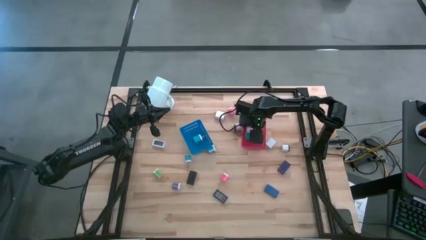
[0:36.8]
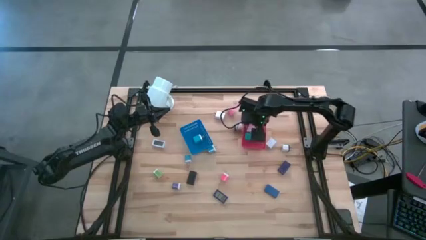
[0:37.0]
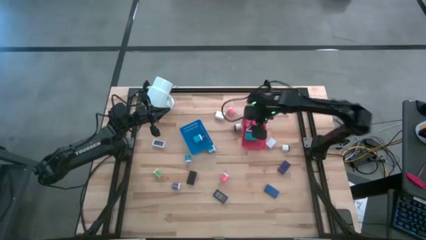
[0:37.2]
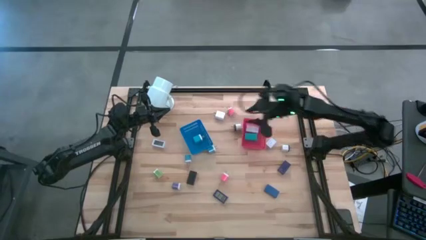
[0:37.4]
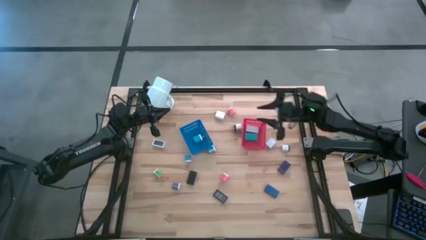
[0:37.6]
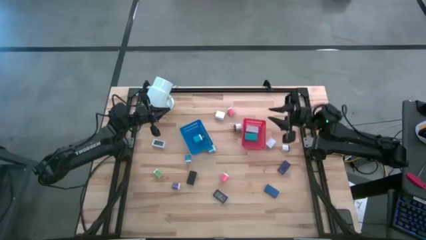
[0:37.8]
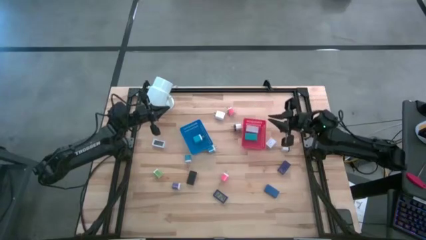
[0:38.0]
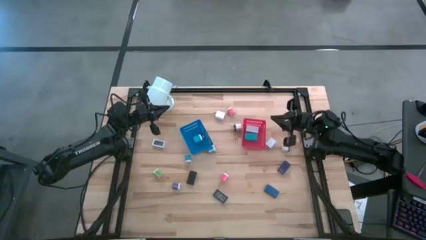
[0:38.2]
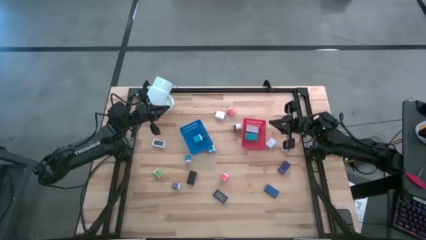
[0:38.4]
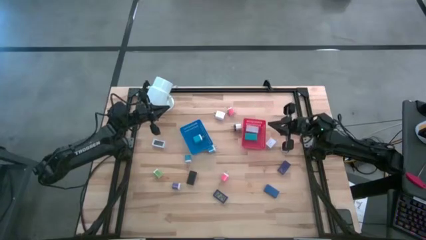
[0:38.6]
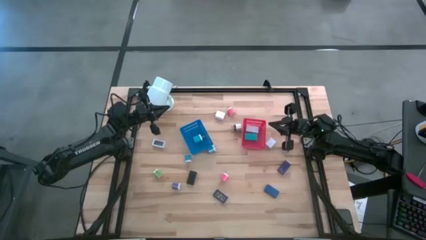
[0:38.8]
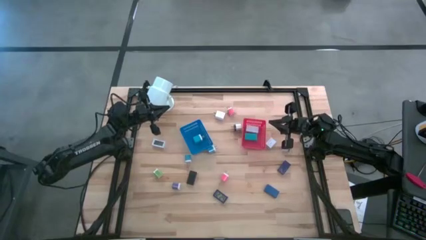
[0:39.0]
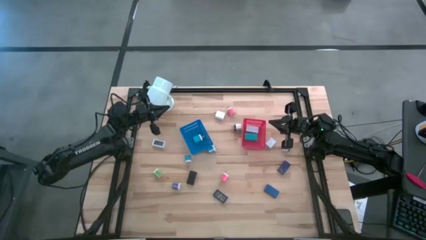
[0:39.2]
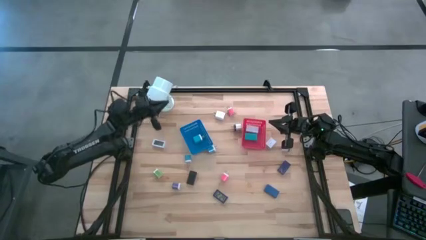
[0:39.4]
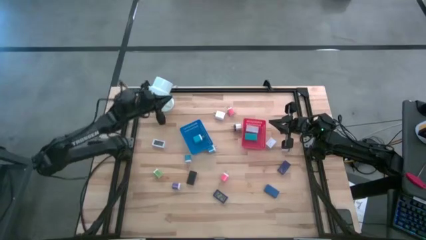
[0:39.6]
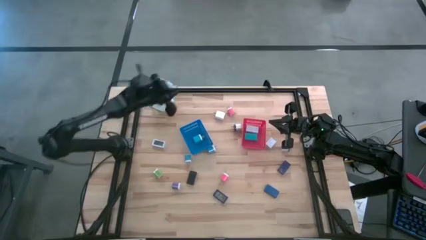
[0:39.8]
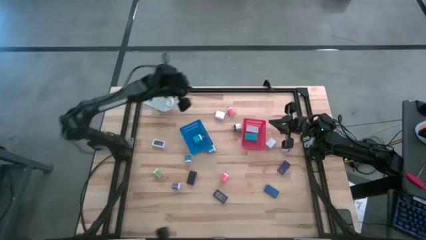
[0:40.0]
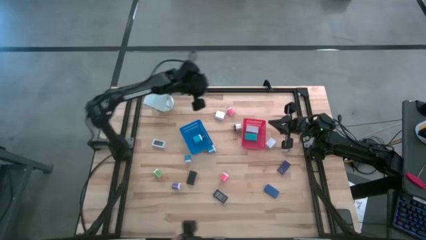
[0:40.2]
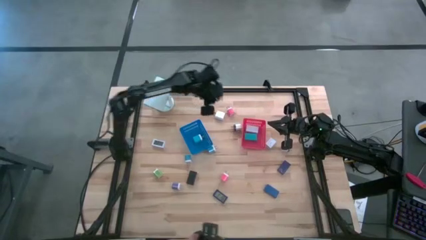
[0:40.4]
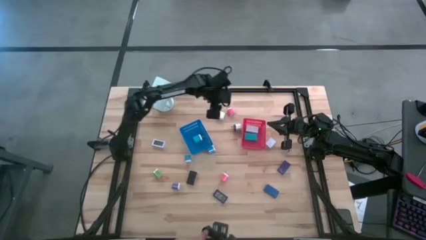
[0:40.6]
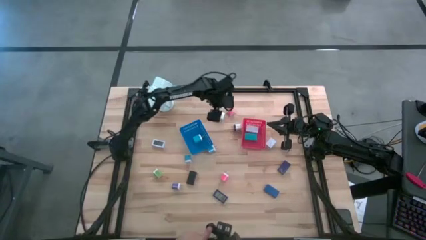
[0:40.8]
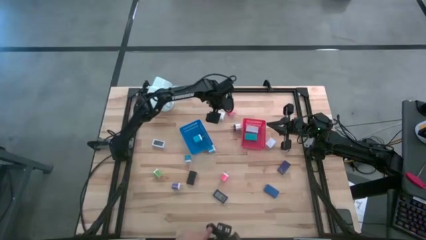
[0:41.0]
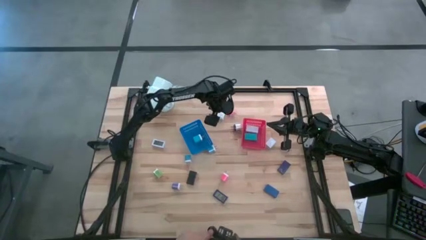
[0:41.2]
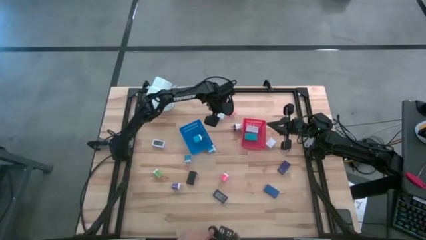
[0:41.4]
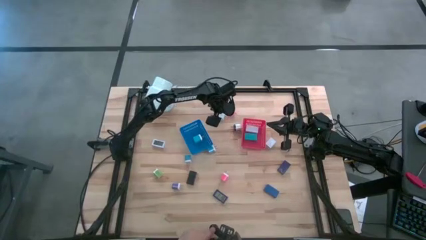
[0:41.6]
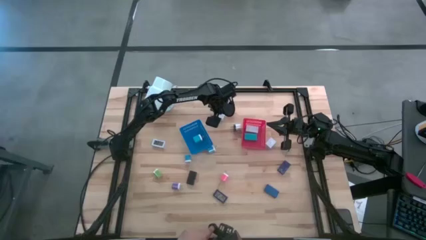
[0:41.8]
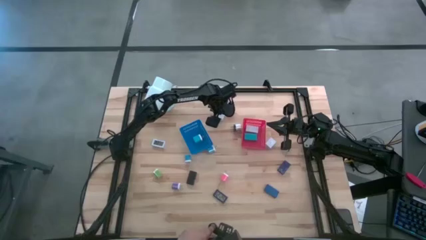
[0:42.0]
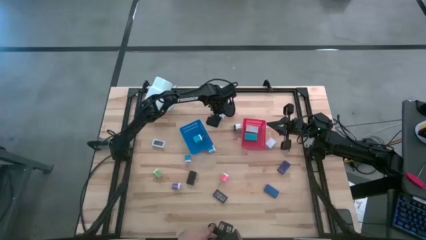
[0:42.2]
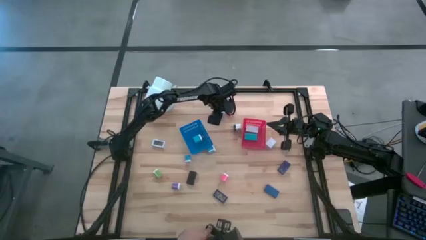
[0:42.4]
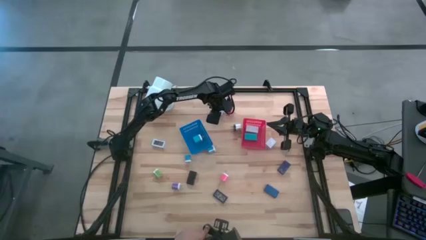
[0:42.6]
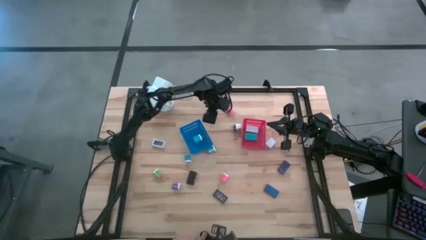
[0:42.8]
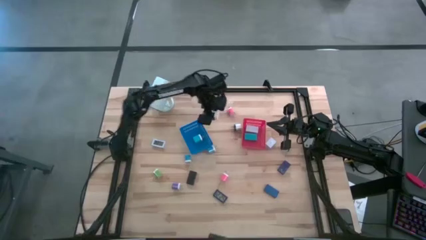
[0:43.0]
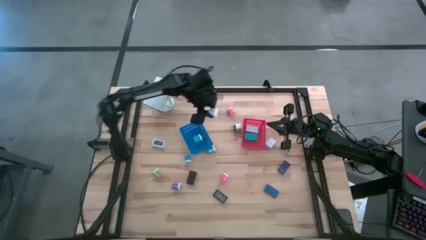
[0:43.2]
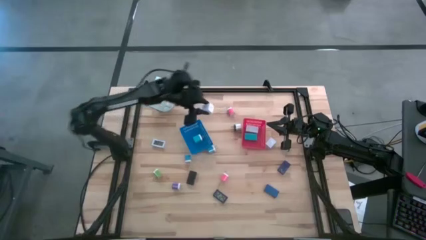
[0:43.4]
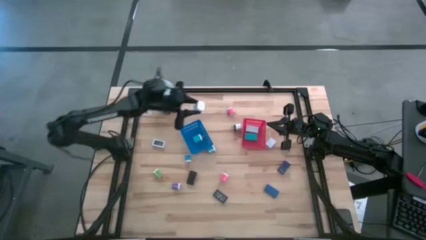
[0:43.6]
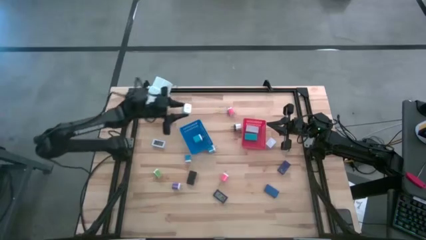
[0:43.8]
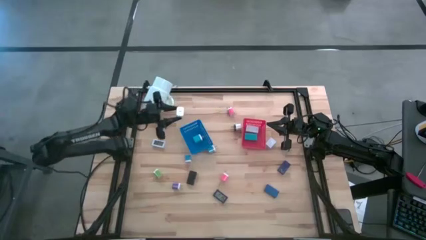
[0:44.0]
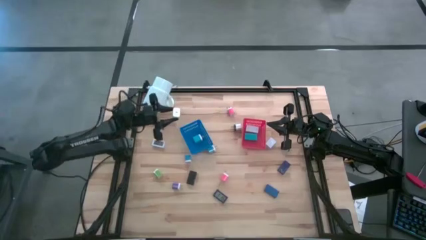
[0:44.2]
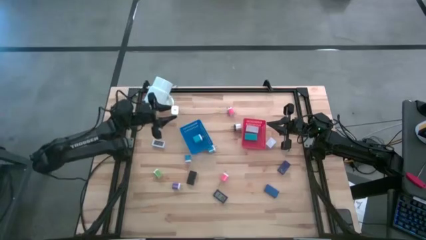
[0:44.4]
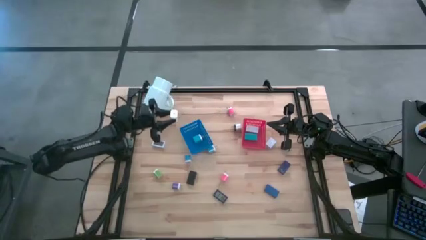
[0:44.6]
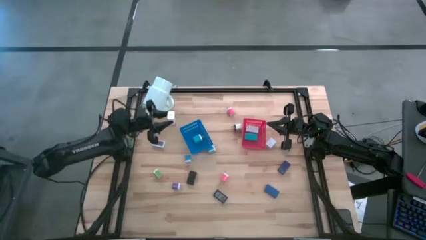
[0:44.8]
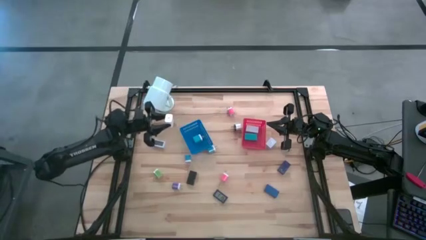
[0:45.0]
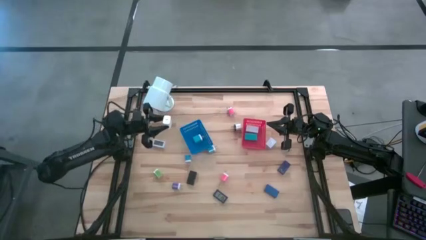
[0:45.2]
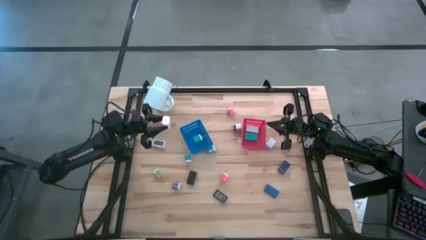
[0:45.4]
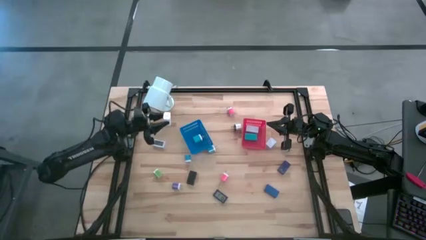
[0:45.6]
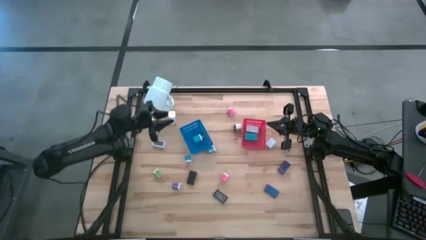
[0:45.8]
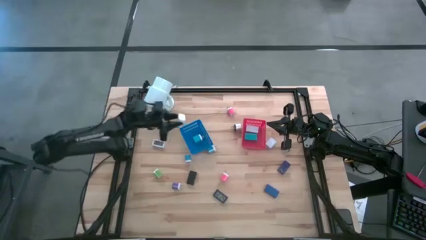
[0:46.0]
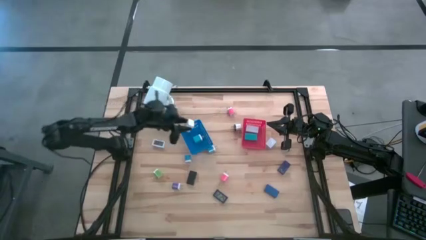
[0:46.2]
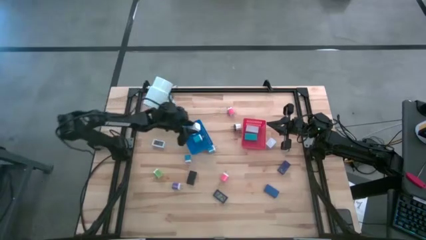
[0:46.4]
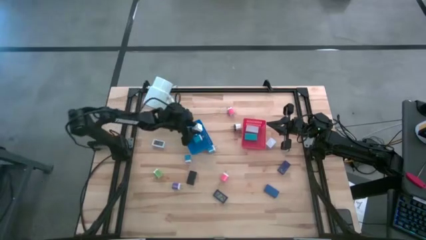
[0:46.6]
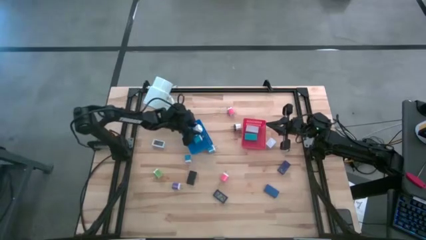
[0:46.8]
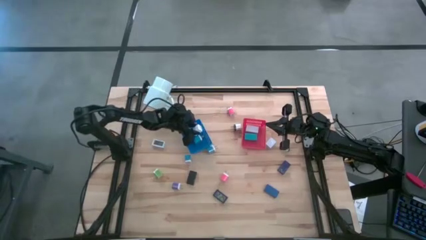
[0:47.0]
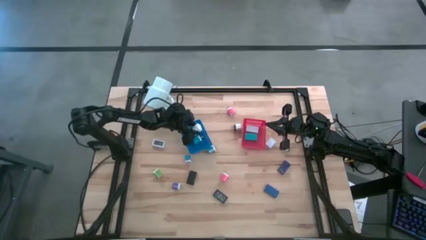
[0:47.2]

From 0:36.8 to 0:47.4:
Task: Pick & Place Office items
Put the top white charger adapter into the blue bin
